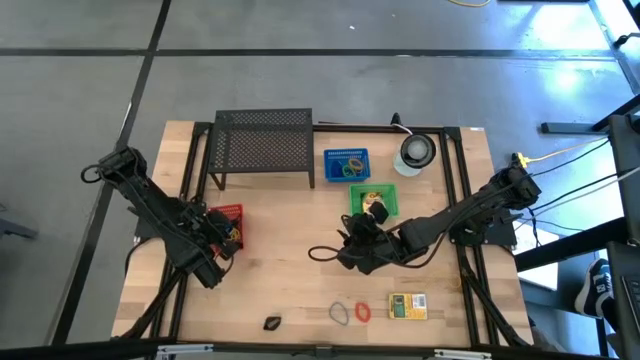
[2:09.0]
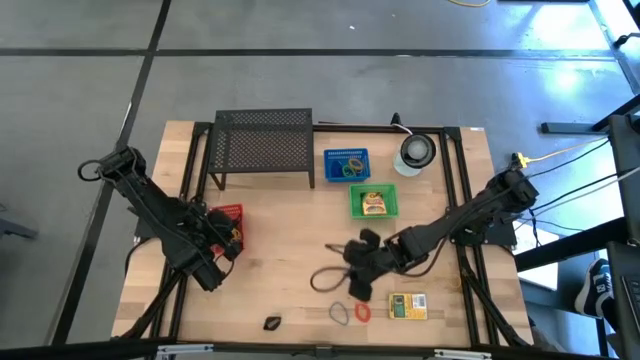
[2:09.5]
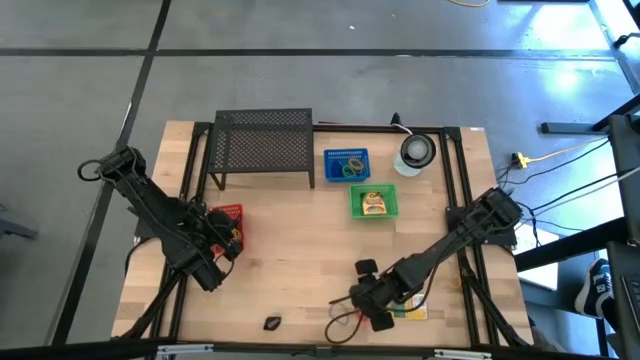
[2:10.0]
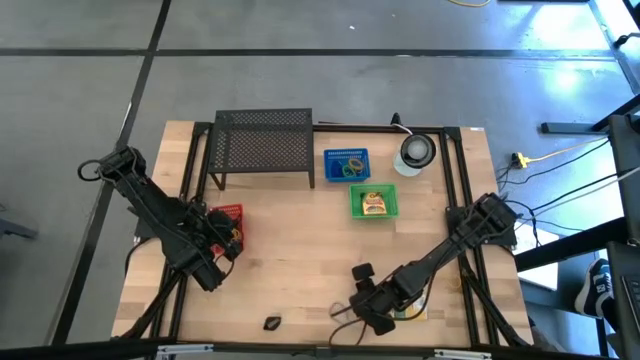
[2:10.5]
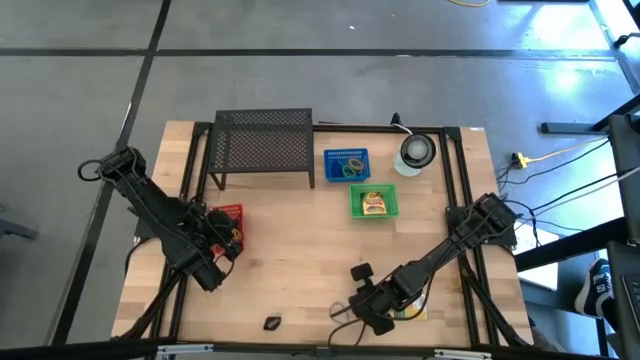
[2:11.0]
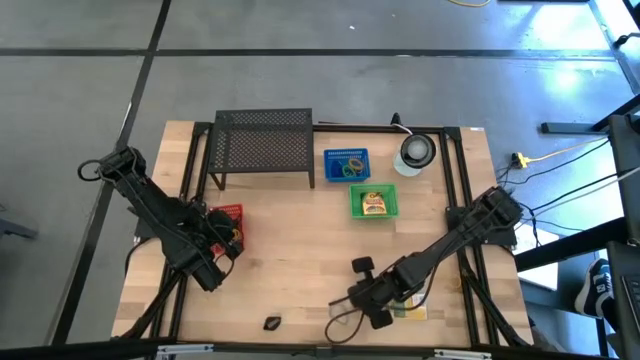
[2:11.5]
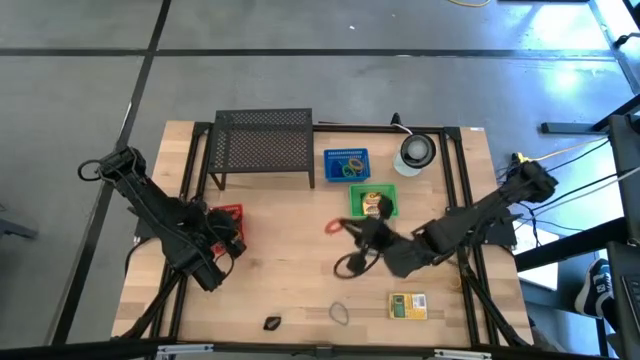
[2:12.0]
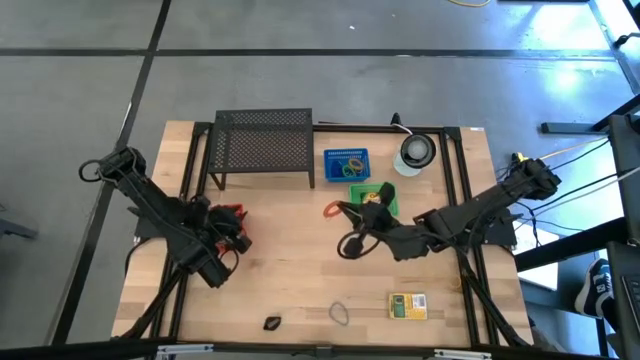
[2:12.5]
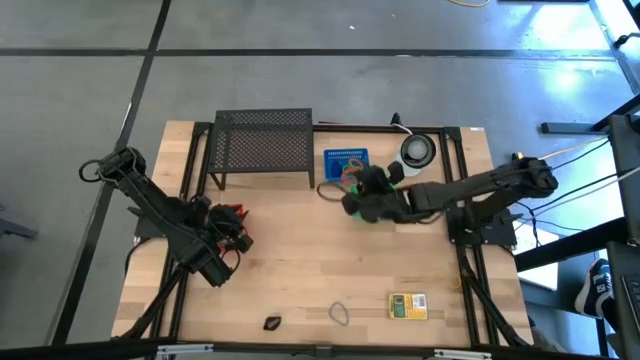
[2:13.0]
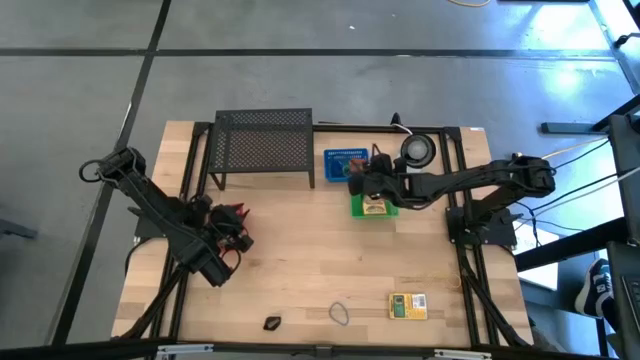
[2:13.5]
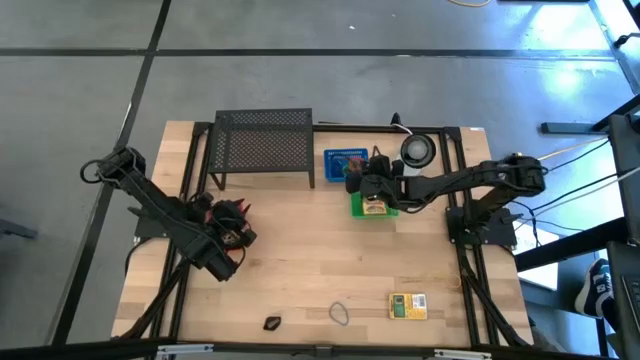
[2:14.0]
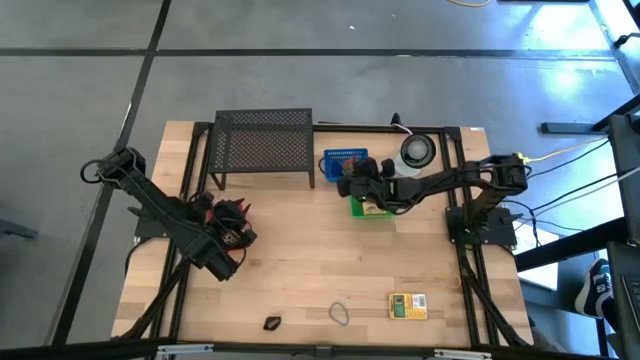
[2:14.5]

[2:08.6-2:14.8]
Task: Pick & Place Office Desk Supplies
Put the orange spring keychain into the blue basket

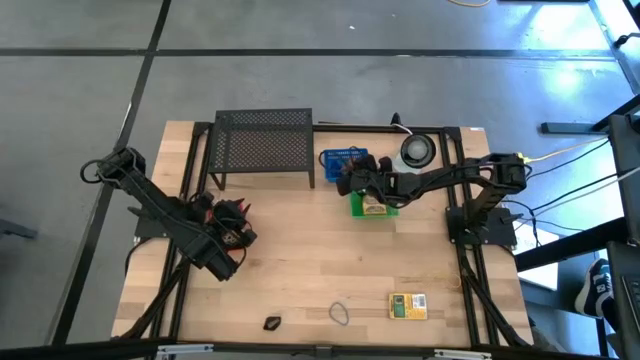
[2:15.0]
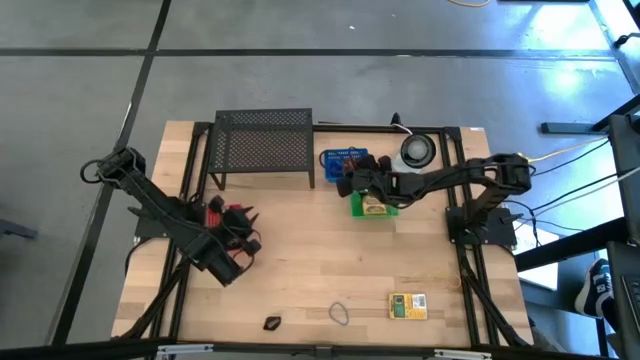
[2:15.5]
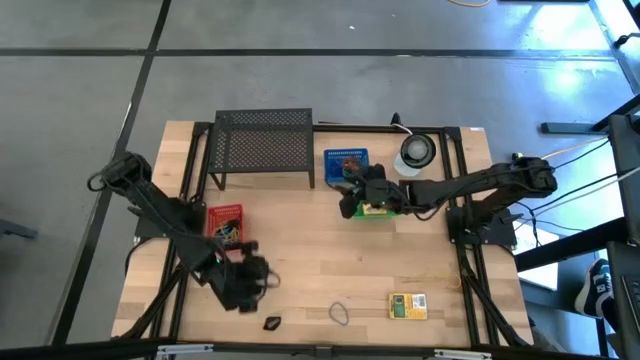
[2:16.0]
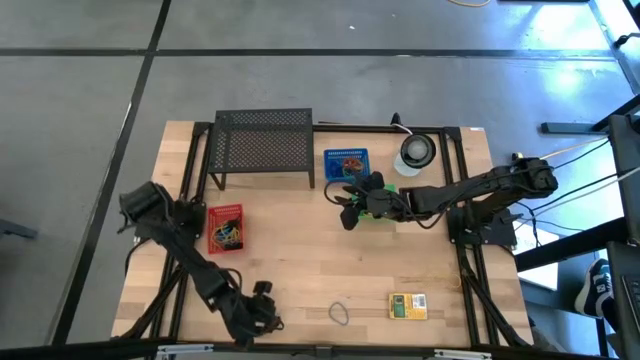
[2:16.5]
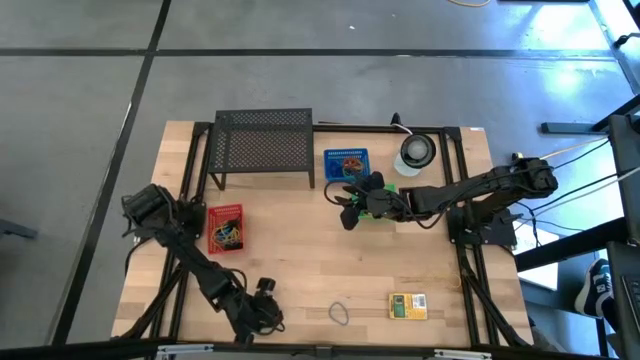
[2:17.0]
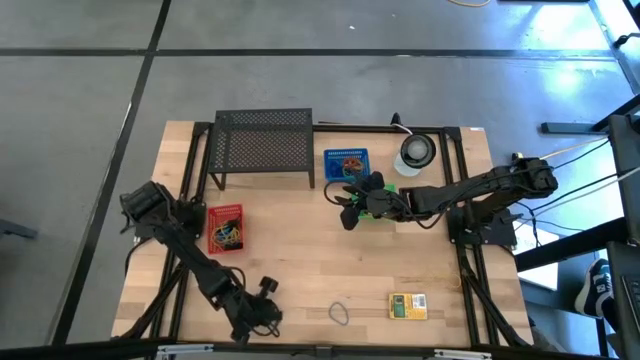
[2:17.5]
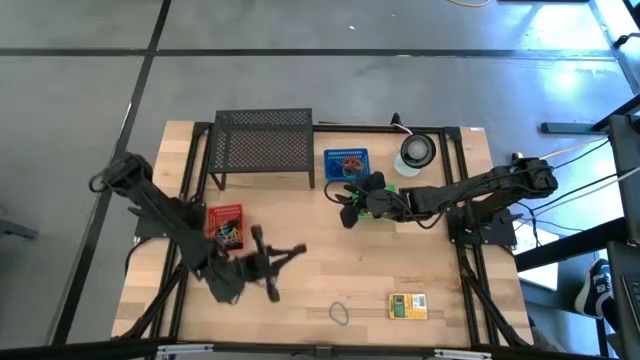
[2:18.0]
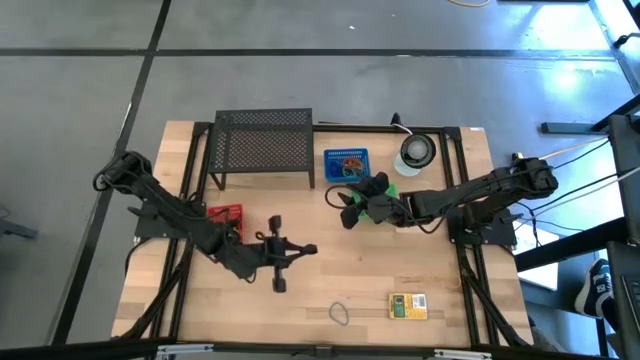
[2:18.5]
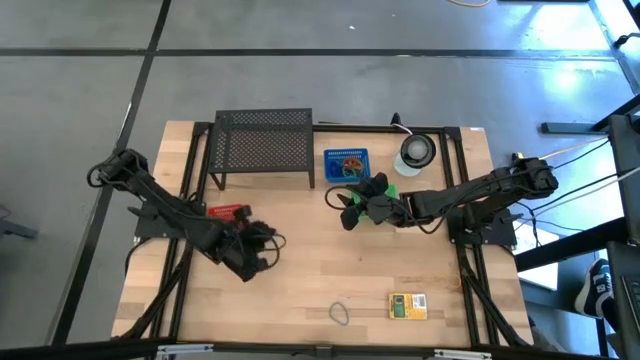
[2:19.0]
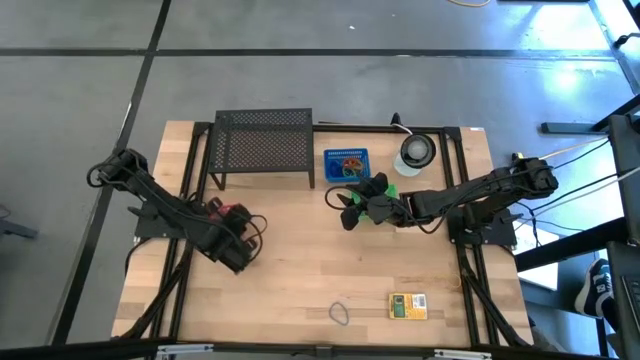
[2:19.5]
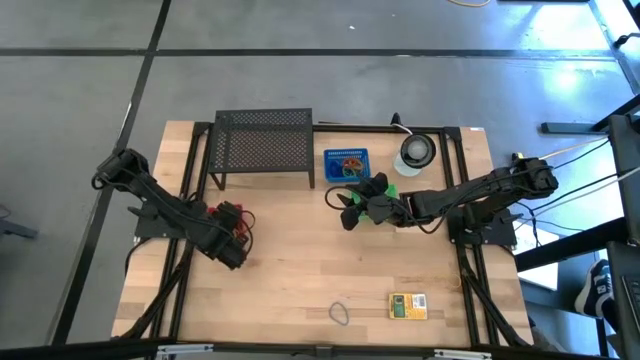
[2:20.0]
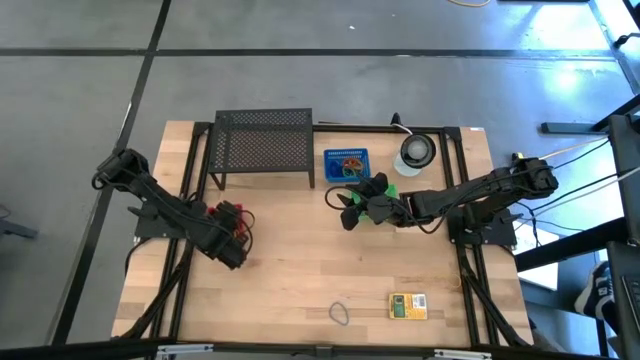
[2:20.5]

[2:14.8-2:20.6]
Put the black rubber band into the orange basket

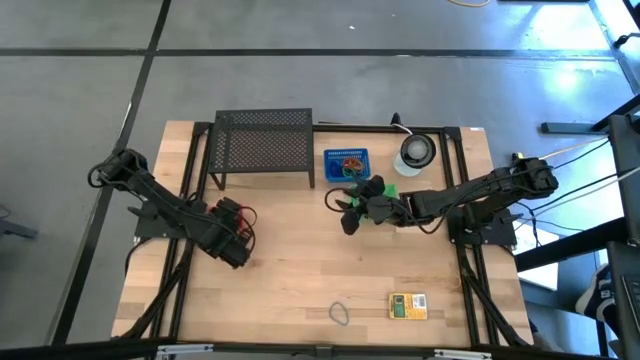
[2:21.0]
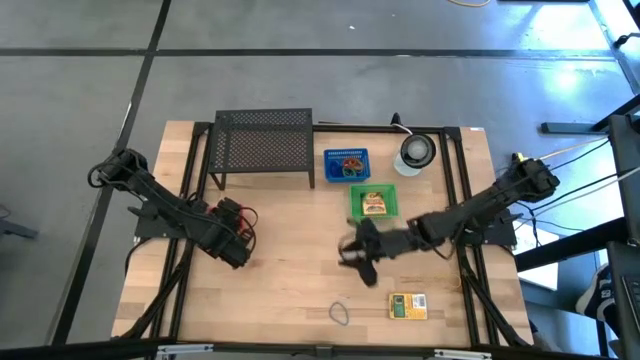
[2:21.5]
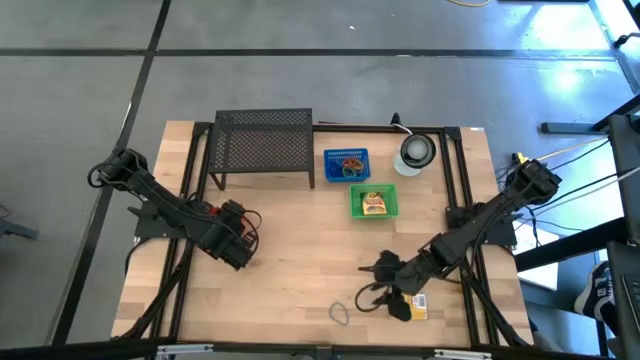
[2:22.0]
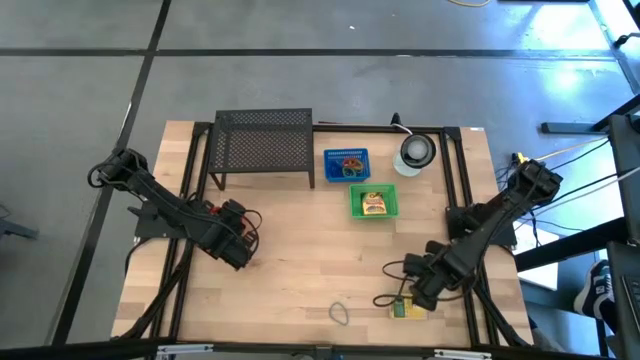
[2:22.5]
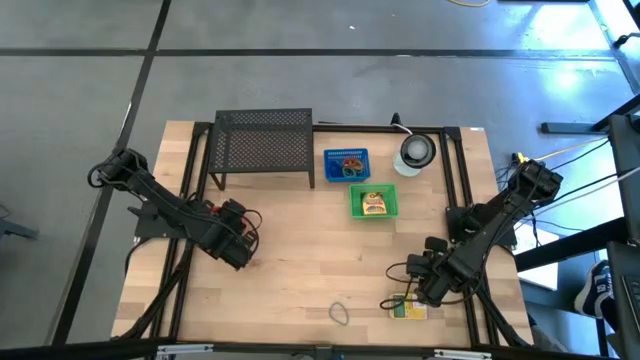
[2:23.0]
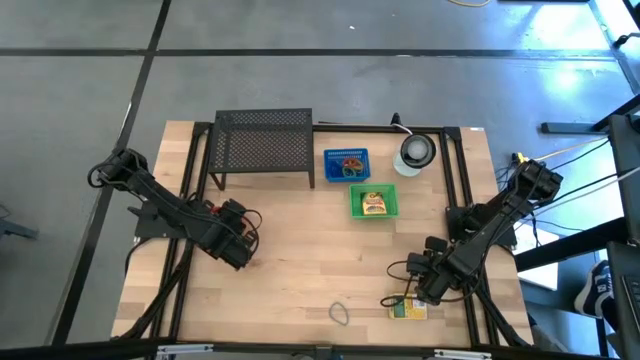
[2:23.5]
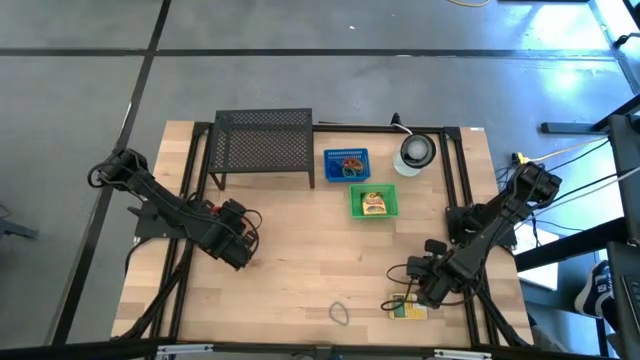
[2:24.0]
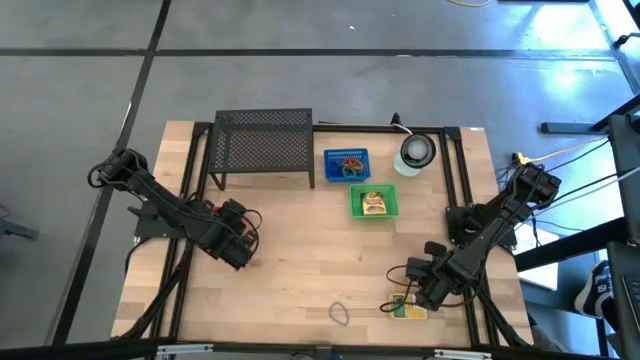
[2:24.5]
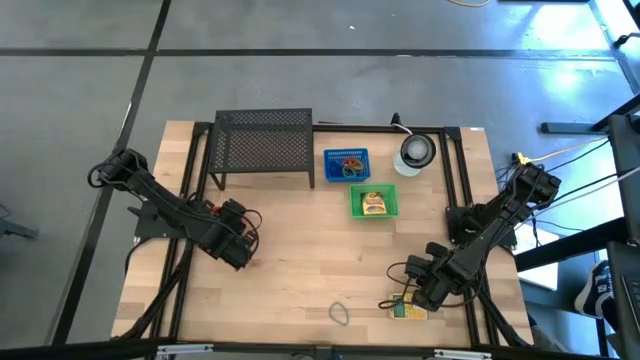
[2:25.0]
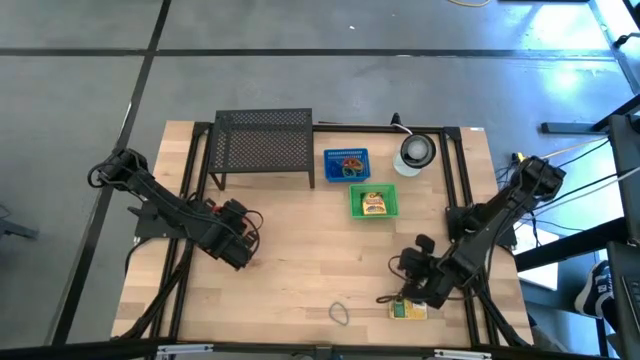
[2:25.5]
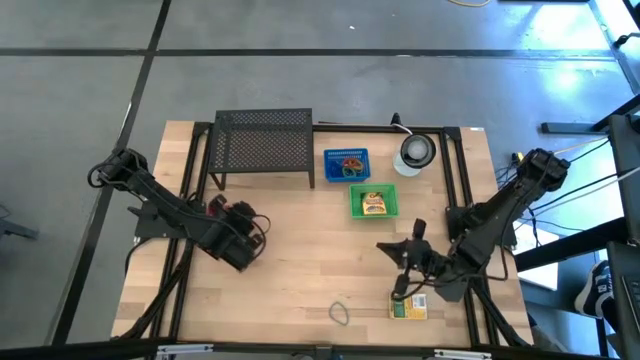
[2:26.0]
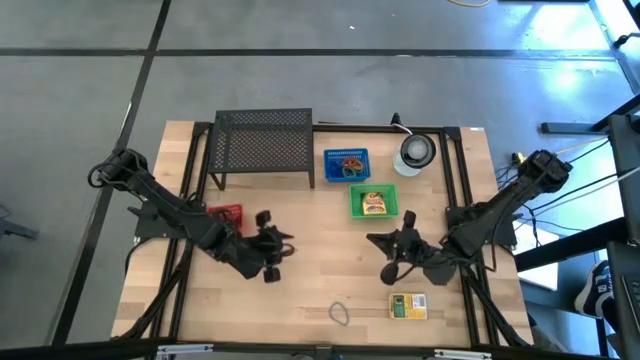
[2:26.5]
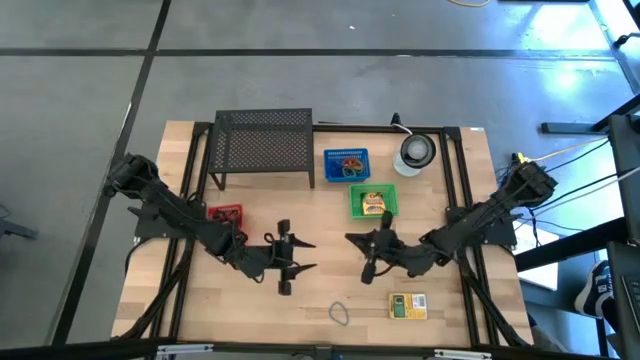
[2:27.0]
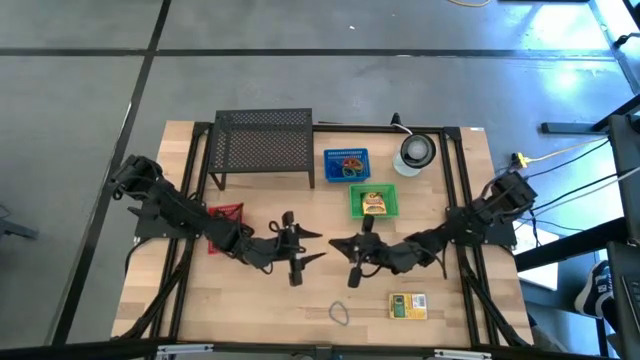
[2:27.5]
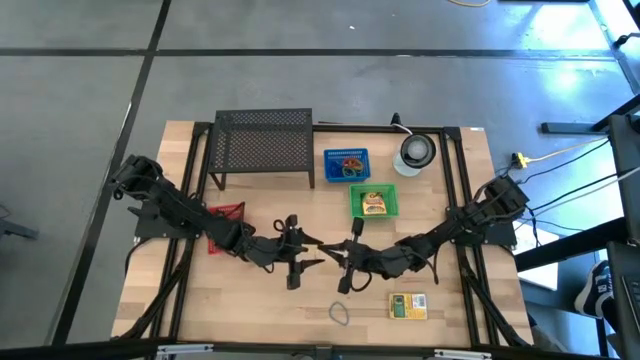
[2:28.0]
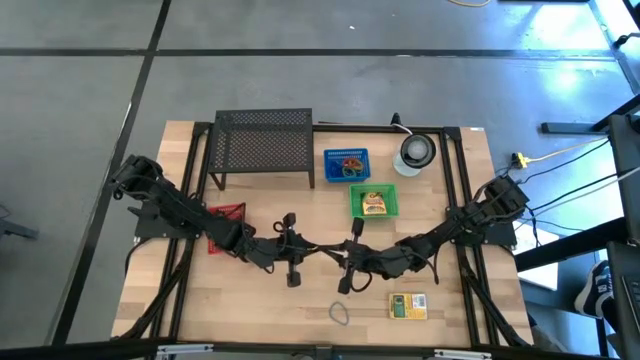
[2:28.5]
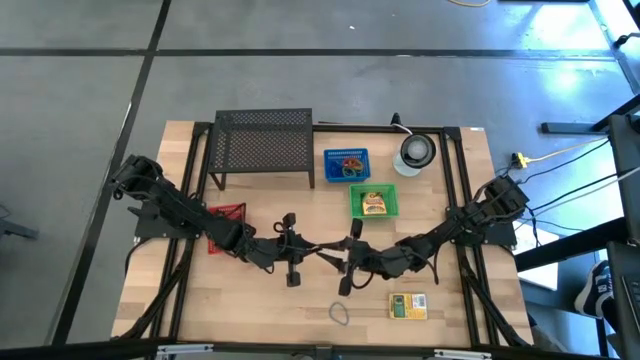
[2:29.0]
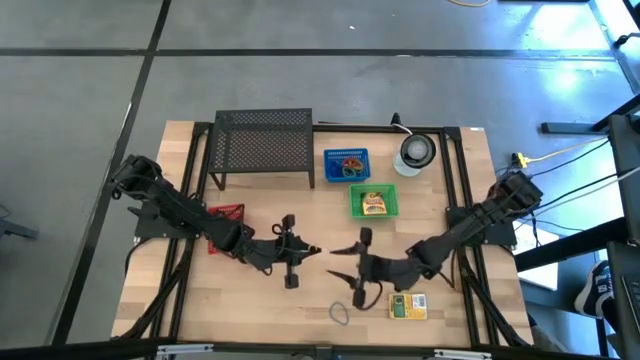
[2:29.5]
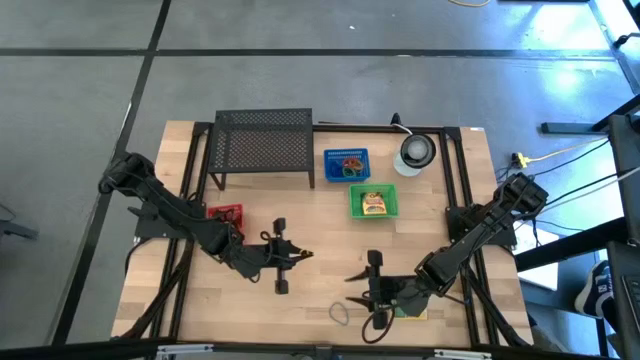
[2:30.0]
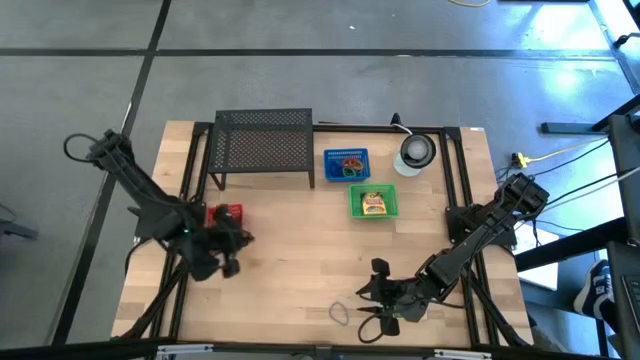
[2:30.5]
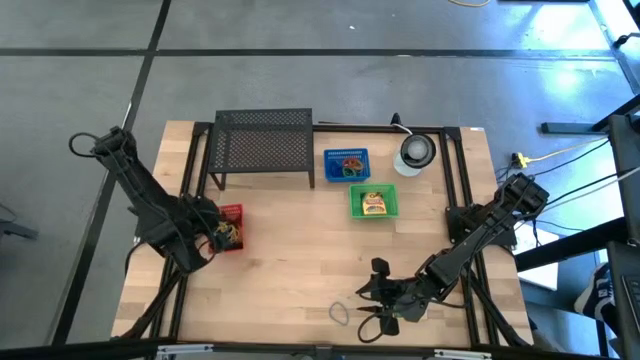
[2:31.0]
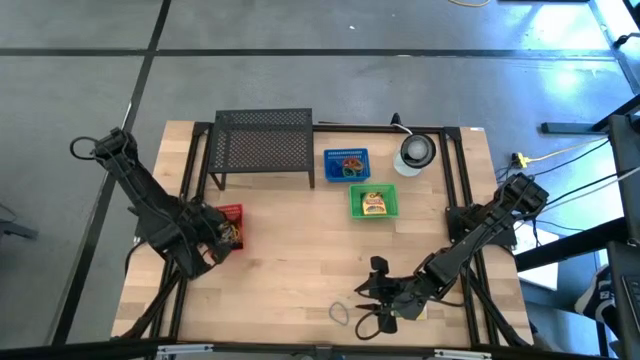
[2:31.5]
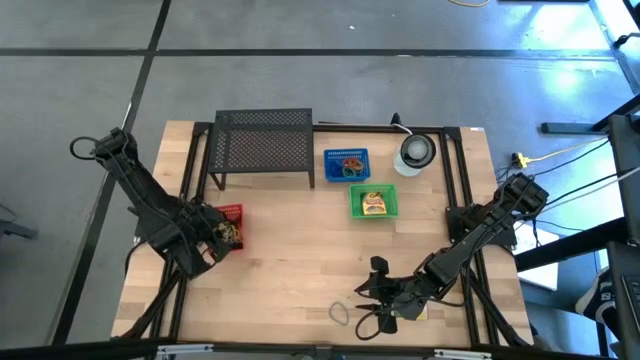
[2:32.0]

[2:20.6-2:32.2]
Put the yellow rubber band into the orange basket
